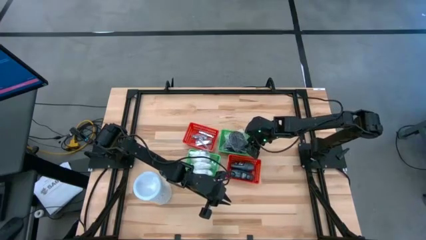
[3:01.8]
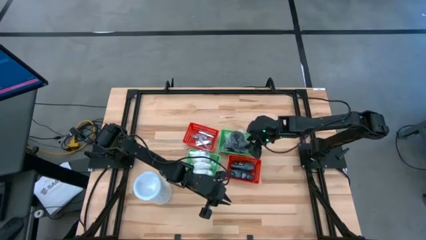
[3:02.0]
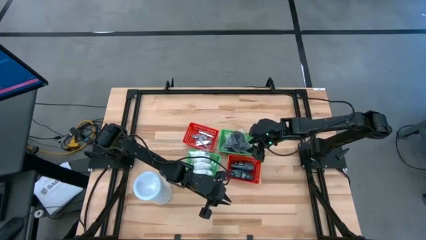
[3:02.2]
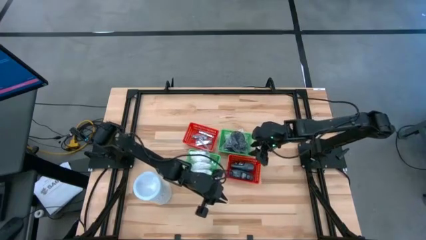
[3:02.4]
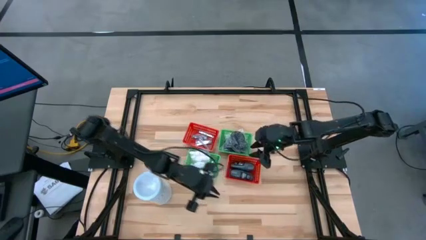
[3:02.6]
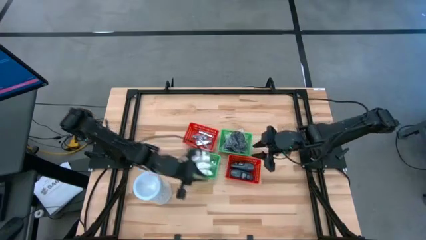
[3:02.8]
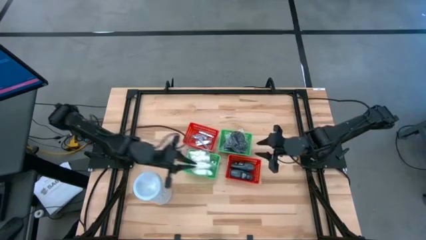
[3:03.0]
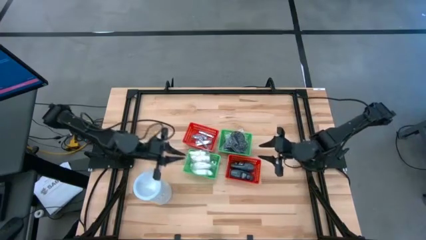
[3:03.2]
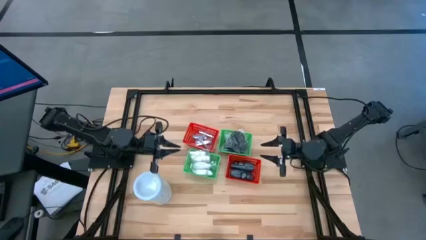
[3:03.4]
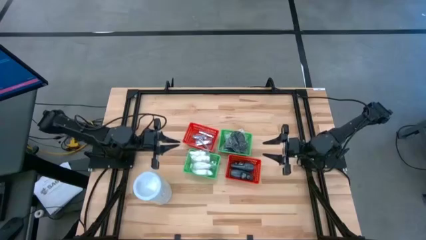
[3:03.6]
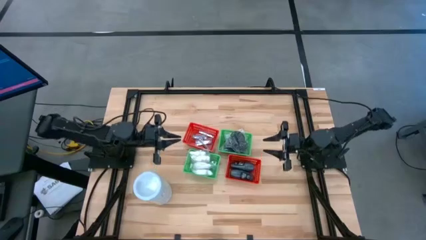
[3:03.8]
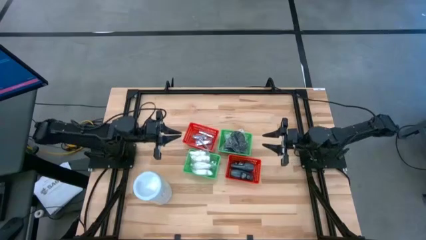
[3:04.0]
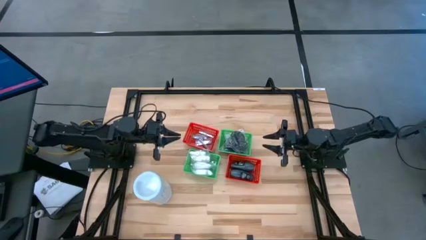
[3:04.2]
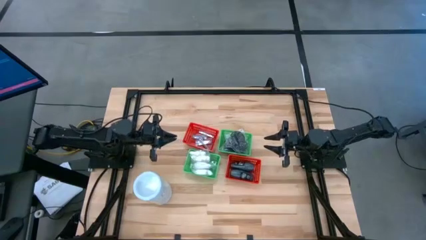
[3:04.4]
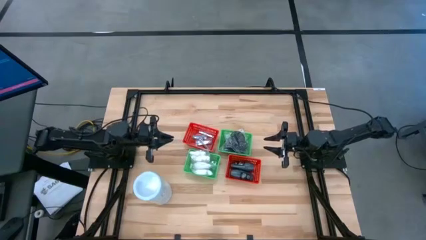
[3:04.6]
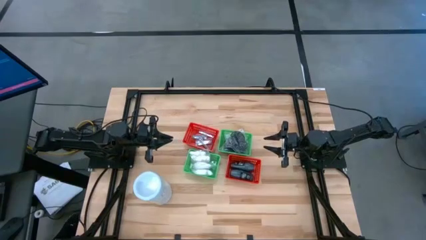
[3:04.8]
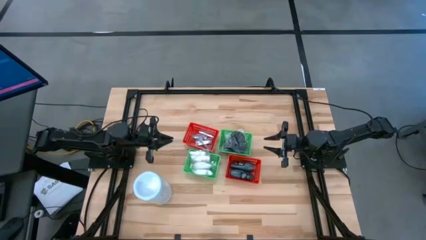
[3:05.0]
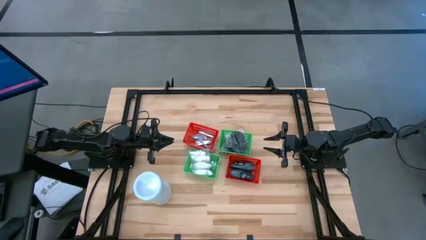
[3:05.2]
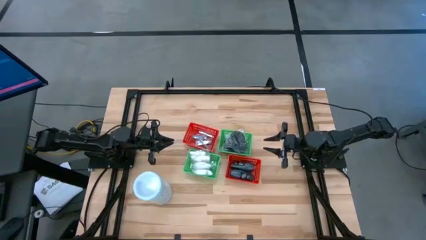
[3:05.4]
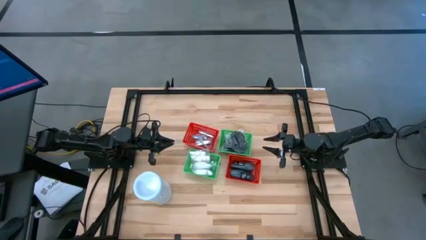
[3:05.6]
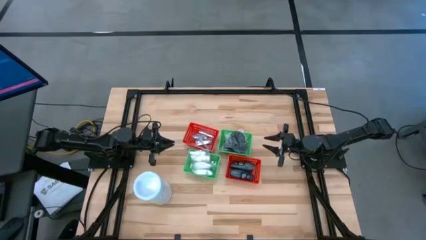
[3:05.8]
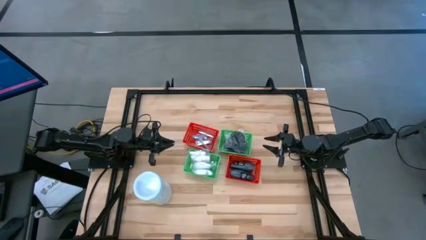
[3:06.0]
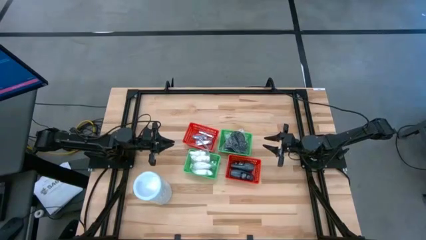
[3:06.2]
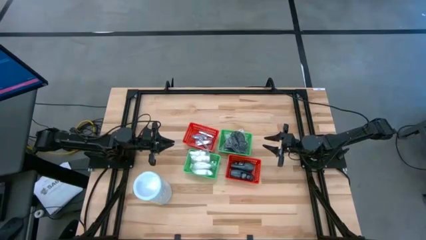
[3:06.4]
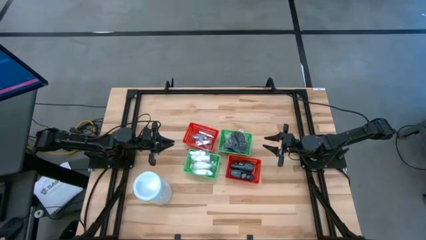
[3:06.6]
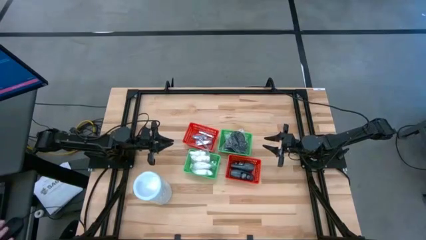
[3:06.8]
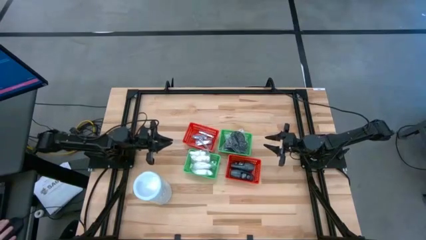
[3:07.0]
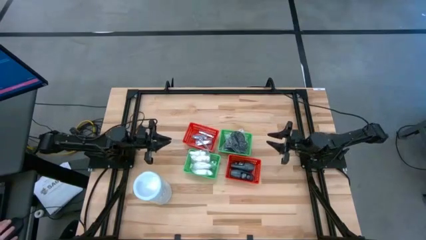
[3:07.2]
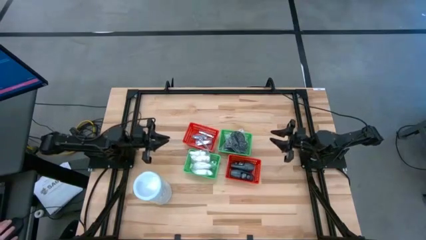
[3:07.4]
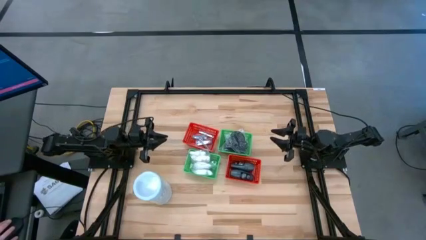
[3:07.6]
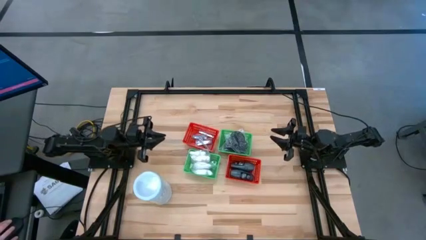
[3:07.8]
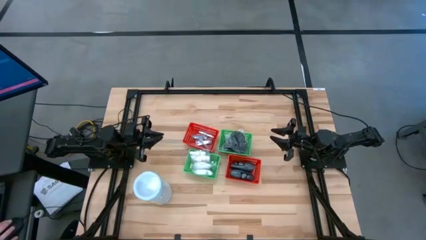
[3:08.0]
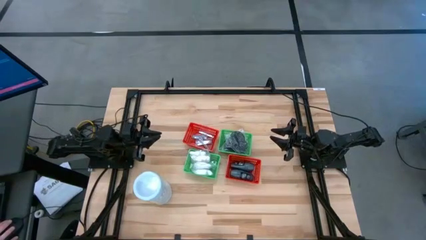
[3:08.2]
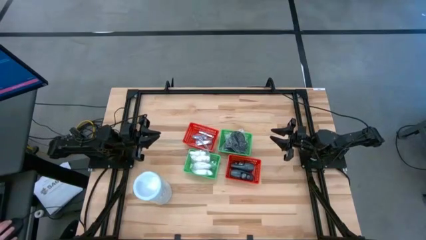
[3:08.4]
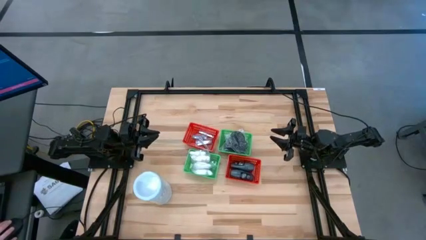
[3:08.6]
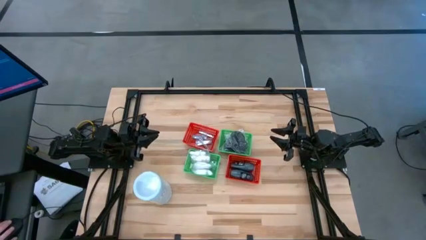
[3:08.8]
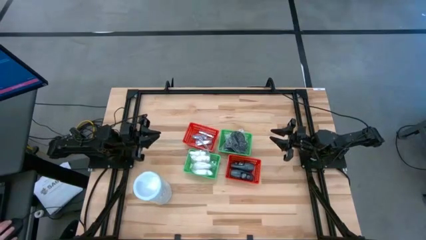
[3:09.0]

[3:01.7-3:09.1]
Task: Pick & Place Travel size toiletries
Return to Home Position

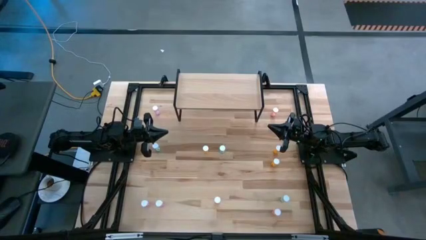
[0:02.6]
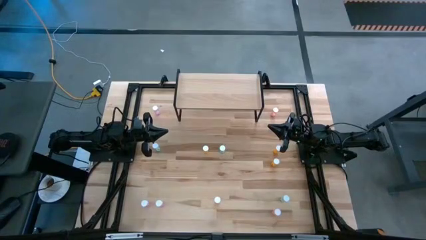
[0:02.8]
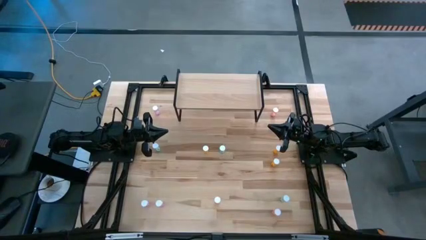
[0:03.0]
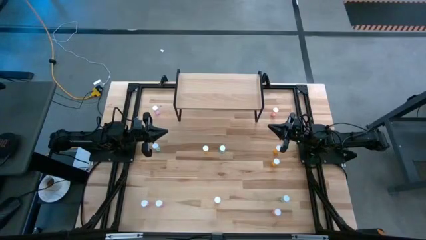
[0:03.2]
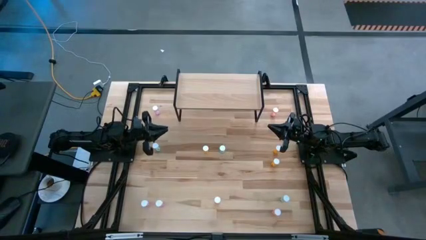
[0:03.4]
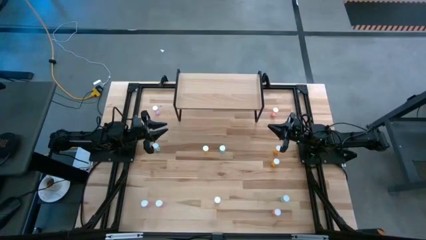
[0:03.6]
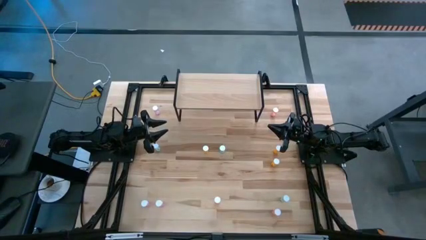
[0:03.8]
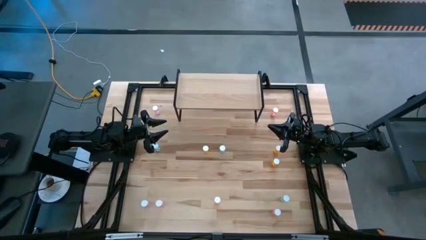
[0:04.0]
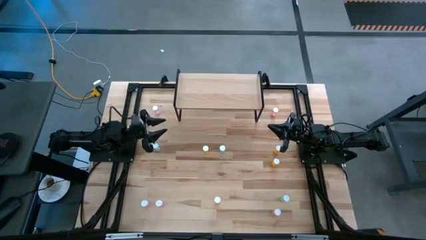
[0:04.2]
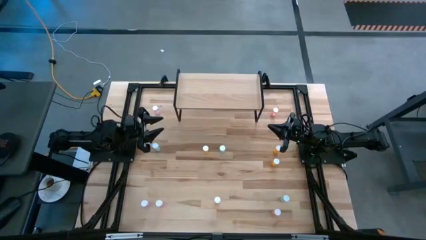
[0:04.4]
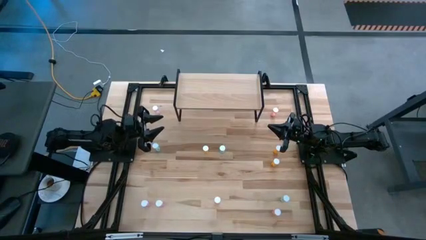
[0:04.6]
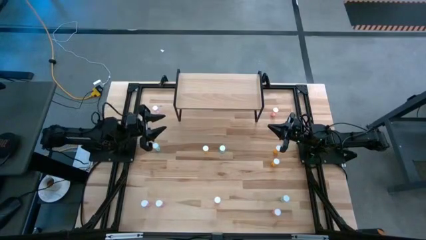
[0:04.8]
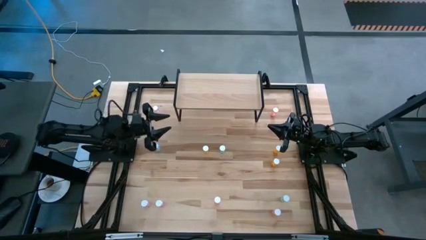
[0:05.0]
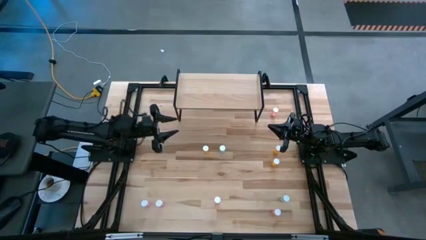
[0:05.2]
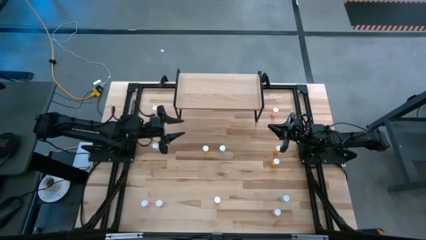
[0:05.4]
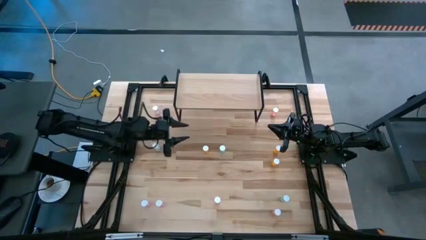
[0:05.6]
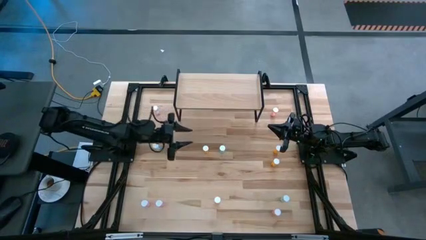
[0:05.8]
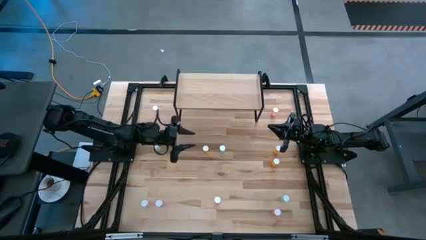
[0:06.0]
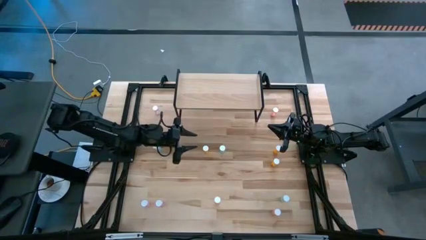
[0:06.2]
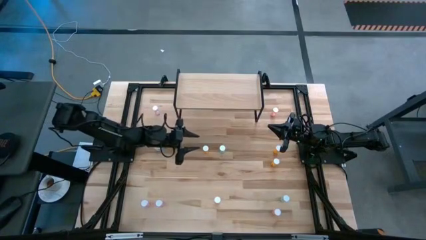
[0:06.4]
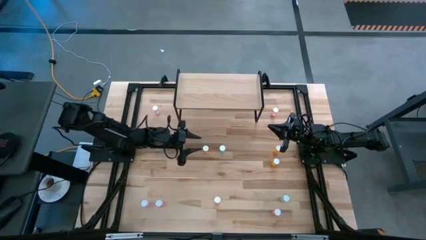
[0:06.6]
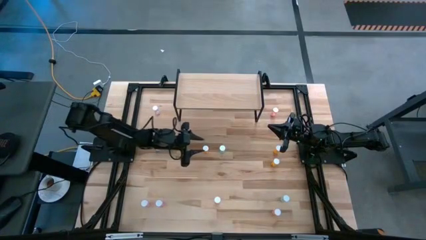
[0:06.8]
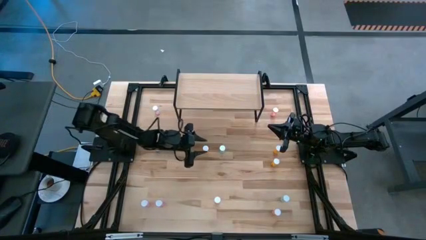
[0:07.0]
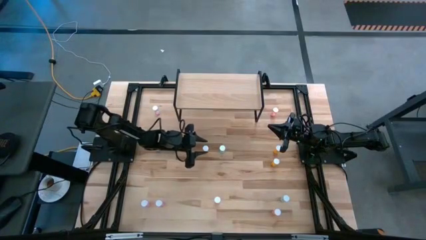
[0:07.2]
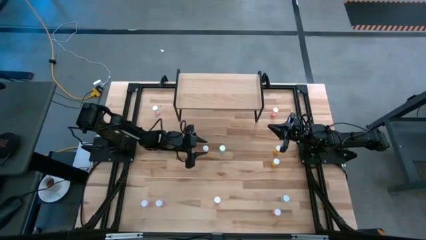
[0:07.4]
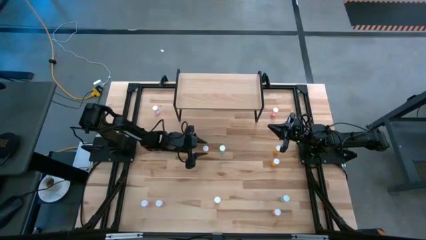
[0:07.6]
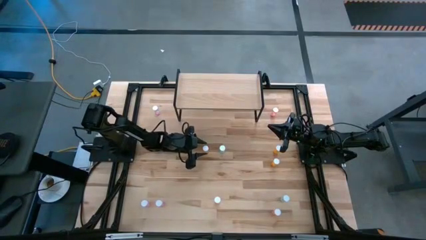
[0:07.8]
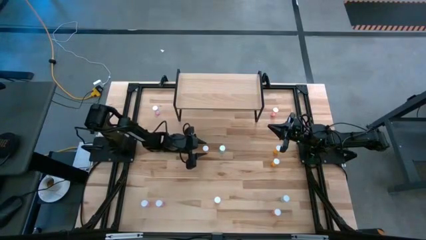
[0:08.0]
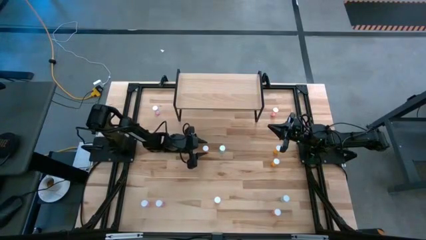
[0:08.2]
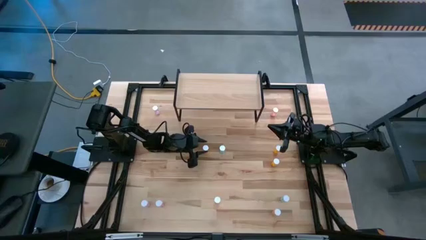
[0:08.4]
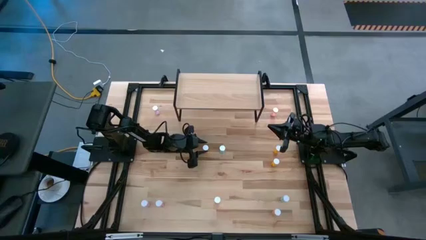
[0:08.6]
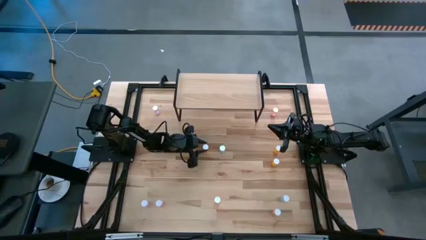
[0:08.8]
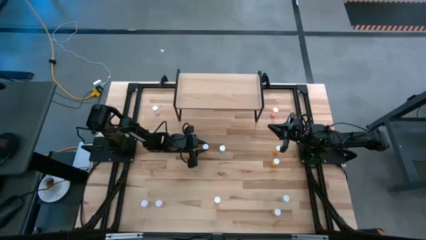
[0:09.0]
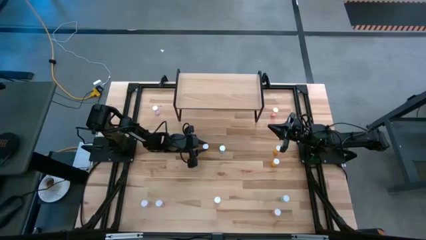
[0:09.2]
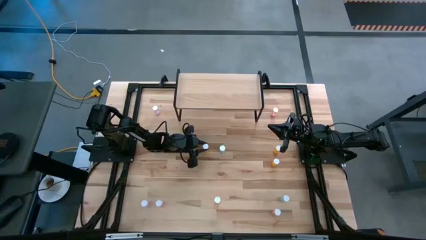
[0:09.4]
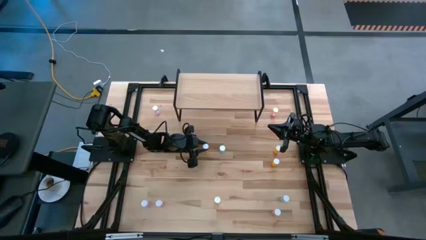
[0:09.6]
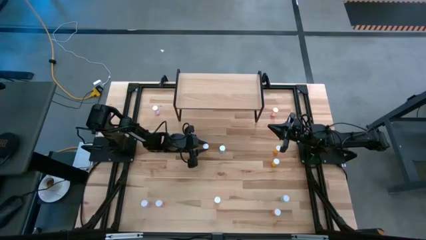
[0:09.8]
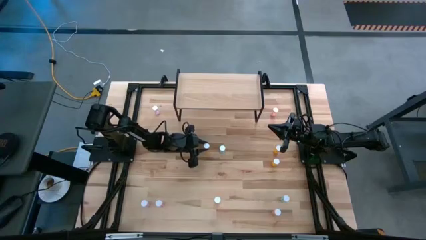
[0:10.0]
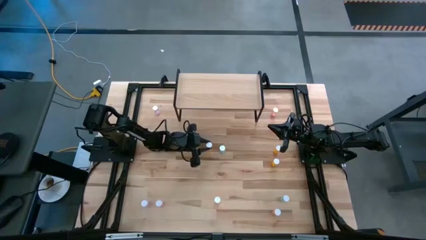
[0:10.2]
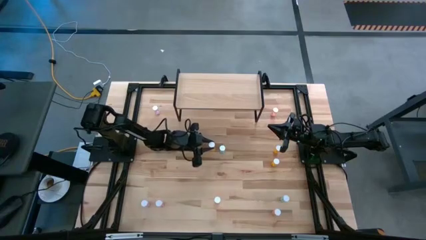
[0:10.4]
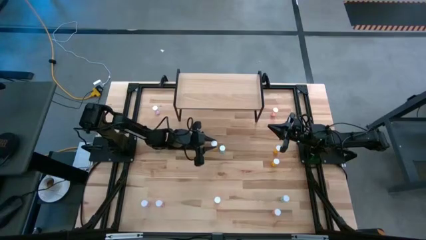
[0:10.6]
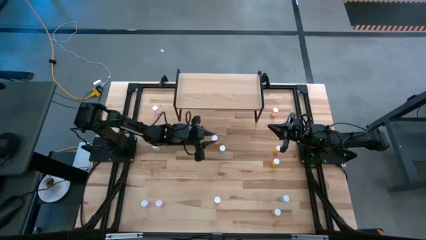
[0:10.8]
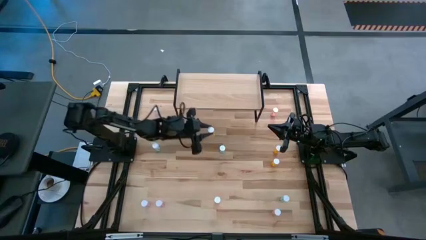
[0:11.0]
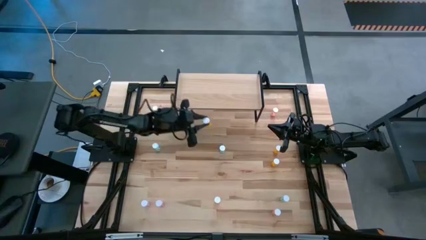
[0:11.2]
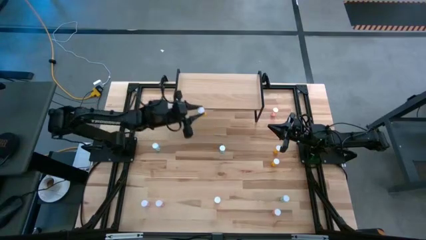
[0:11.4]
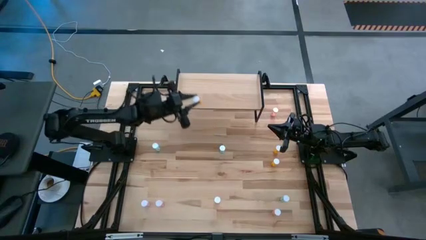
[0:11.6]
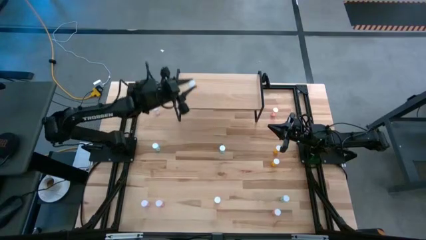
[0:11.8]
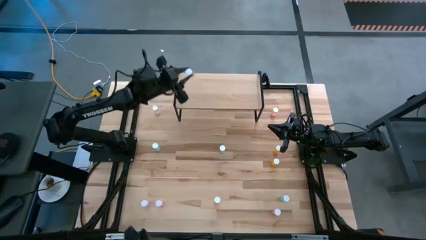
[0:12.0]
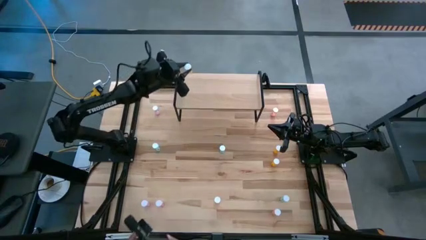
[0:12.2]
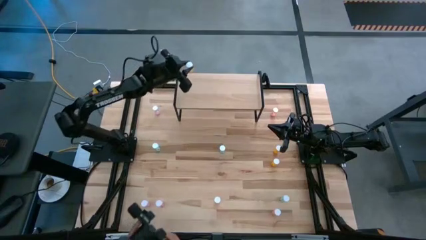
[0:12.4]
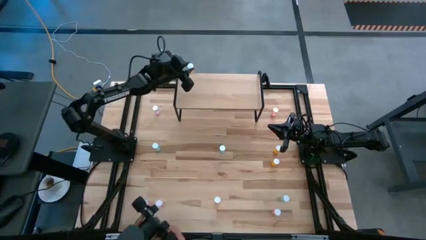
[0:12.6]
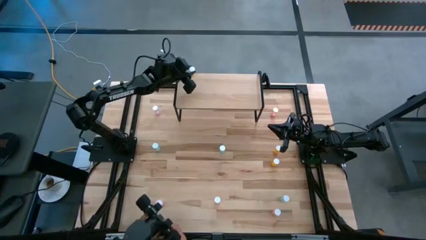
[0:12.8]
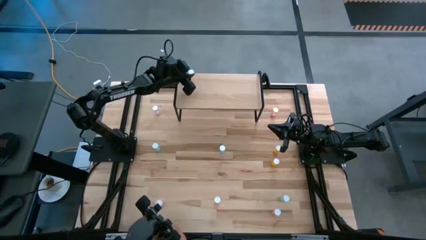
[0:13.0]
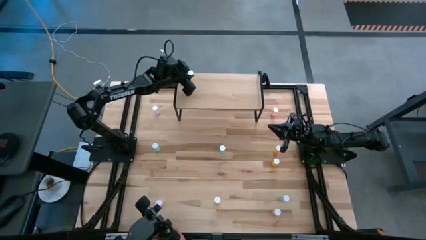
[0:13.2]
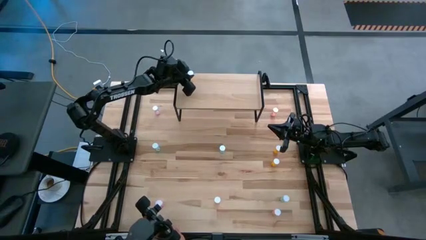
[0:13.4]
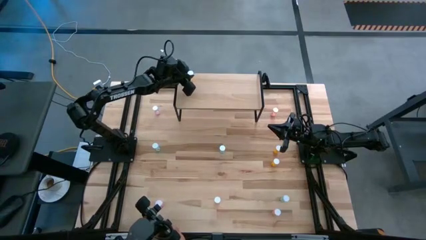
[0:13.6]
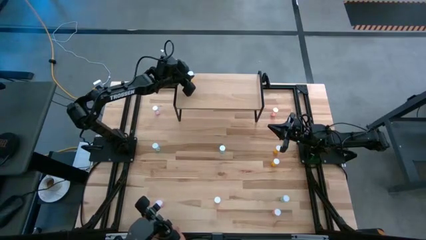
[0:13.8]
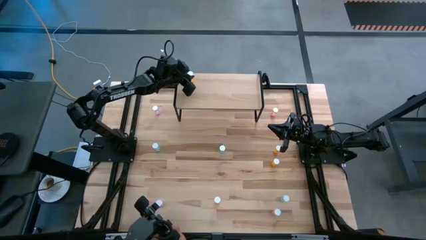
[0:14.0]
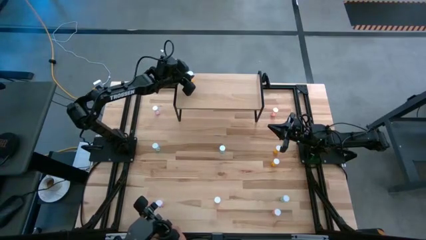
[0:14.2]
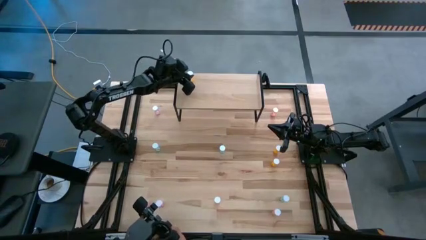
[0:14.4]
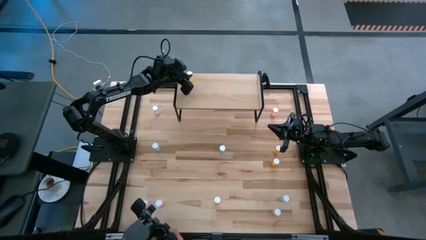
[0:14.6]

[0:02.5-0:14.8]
Task: Pick and place medicine bottles onto shelf by color
Put the left orange pill bottle on the shelf
